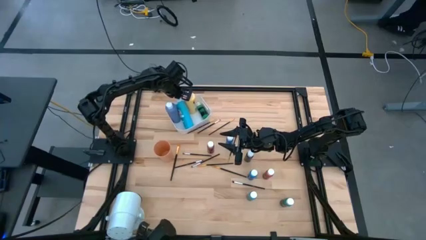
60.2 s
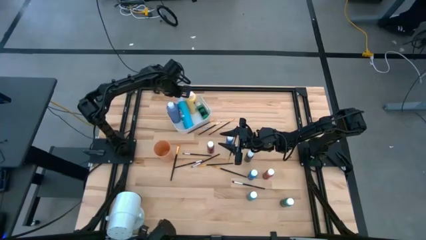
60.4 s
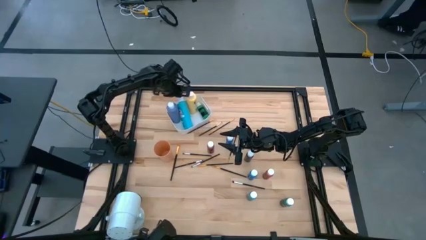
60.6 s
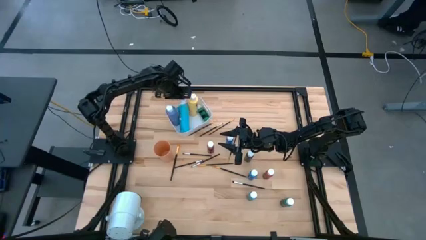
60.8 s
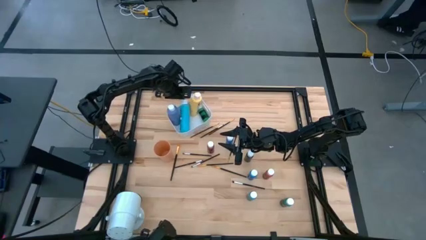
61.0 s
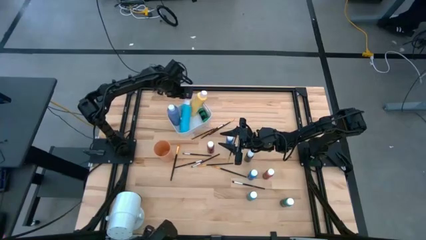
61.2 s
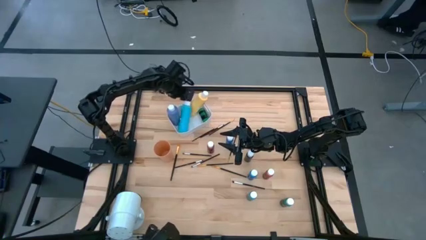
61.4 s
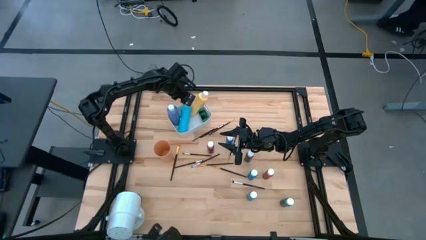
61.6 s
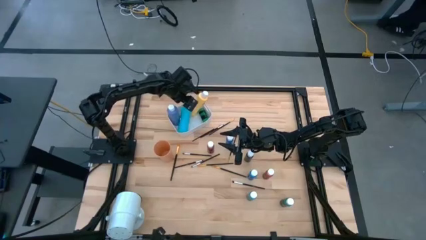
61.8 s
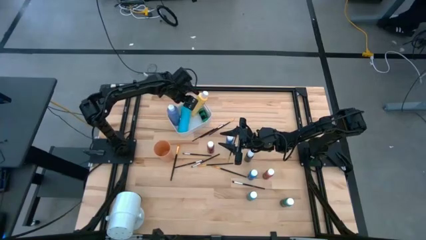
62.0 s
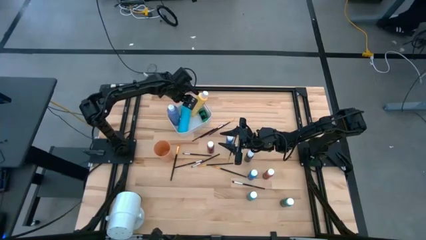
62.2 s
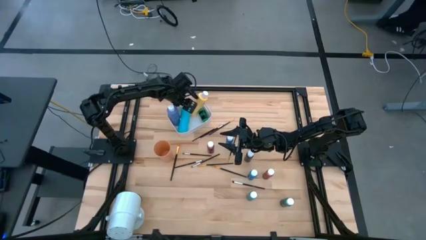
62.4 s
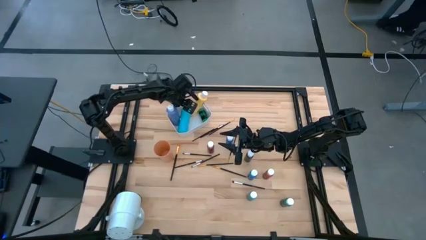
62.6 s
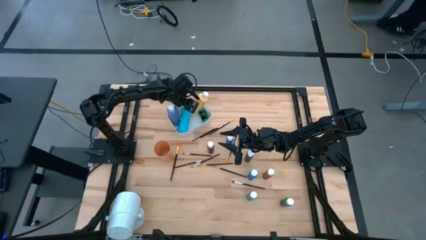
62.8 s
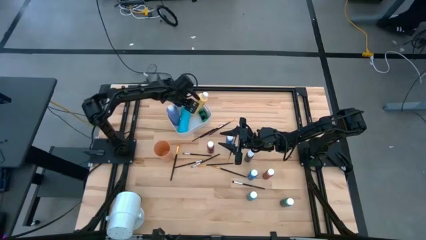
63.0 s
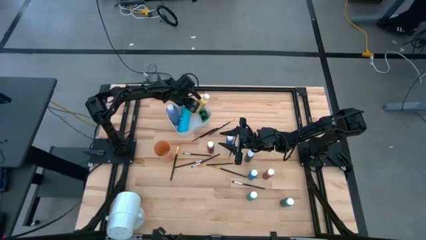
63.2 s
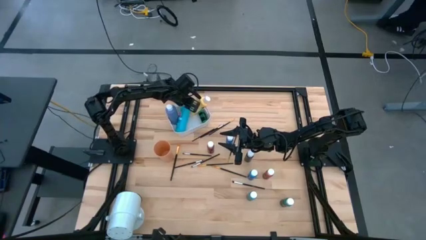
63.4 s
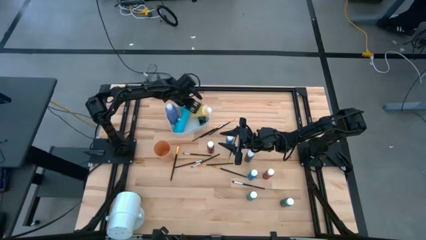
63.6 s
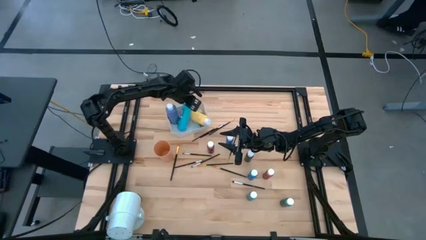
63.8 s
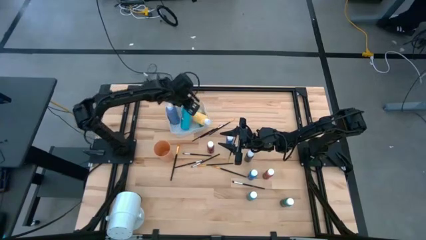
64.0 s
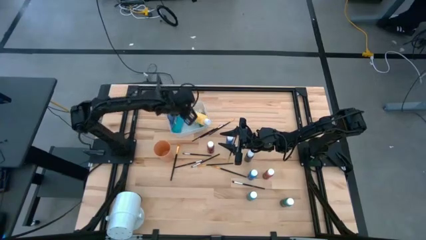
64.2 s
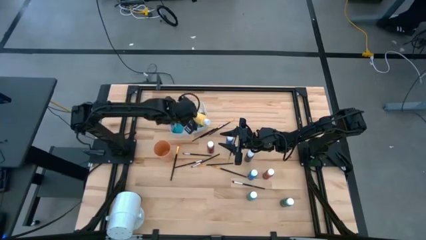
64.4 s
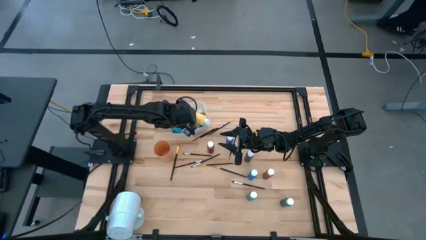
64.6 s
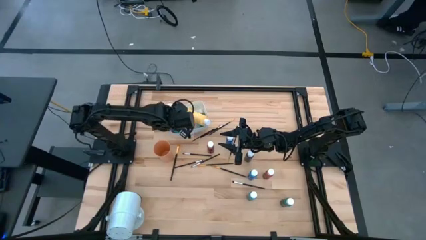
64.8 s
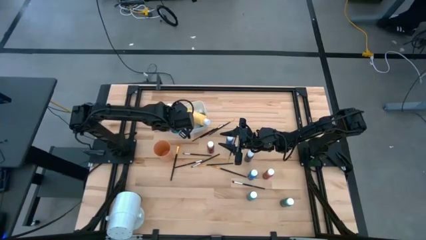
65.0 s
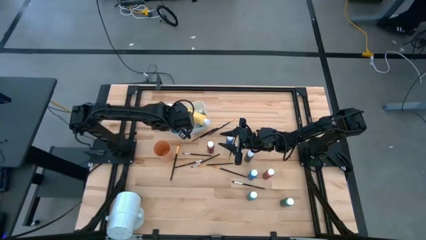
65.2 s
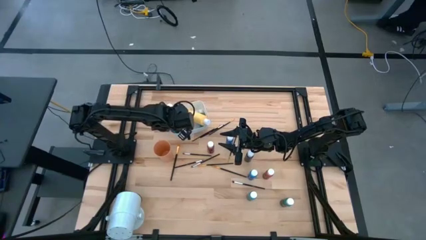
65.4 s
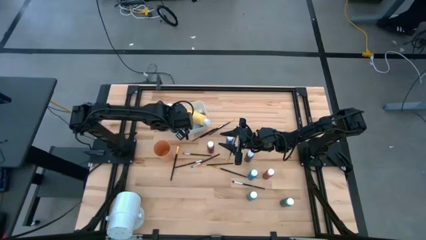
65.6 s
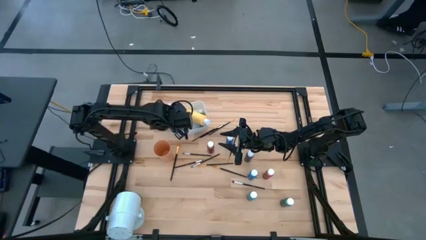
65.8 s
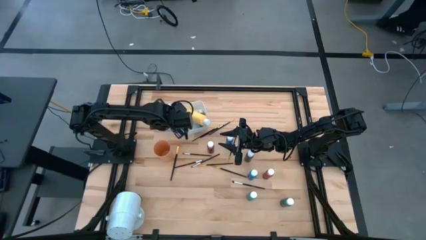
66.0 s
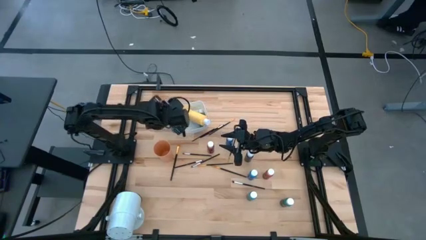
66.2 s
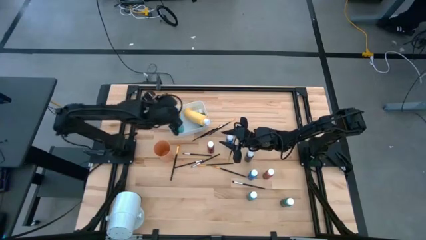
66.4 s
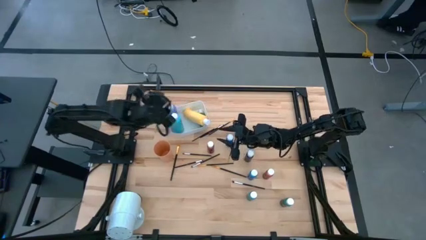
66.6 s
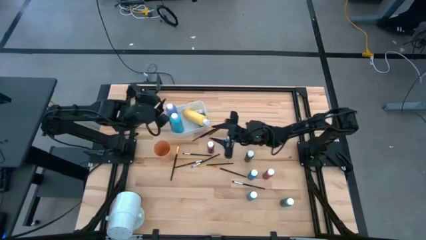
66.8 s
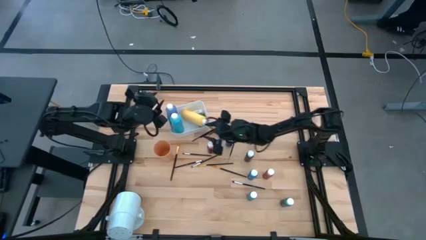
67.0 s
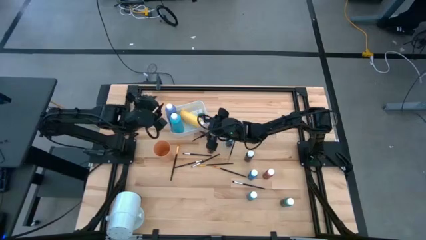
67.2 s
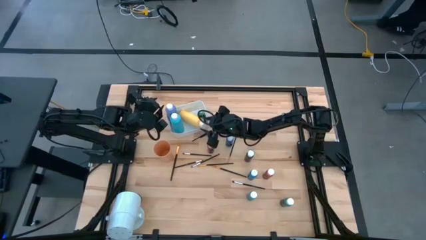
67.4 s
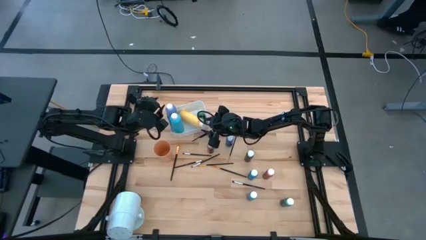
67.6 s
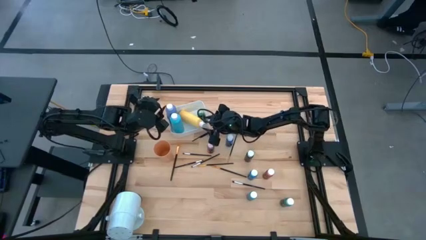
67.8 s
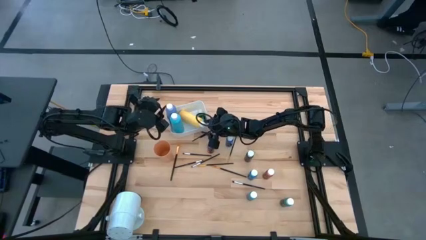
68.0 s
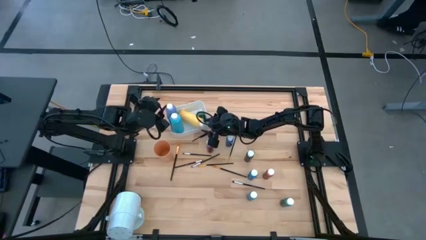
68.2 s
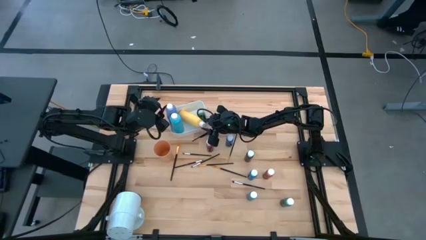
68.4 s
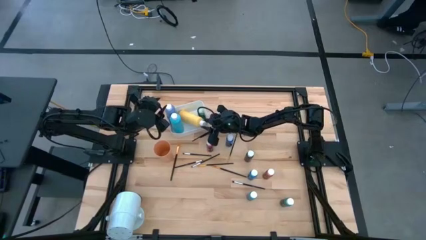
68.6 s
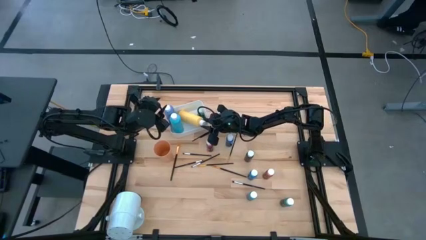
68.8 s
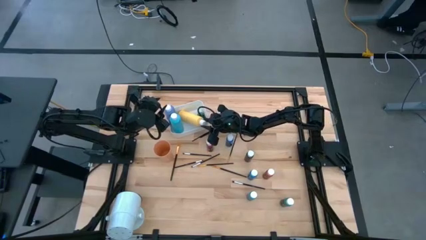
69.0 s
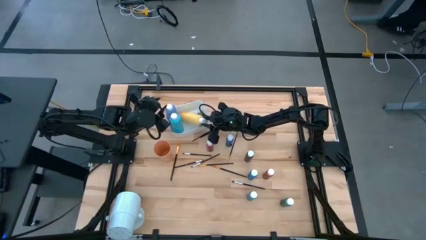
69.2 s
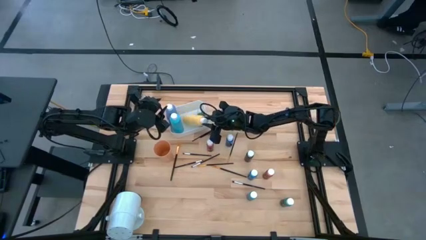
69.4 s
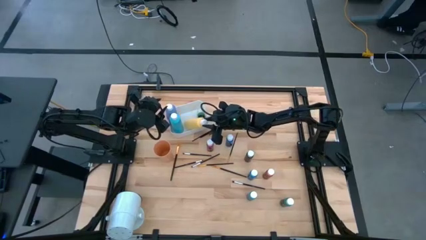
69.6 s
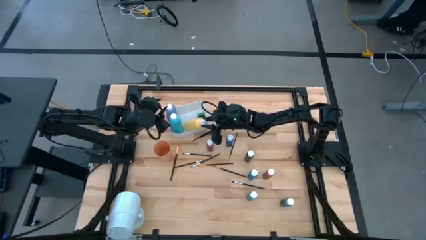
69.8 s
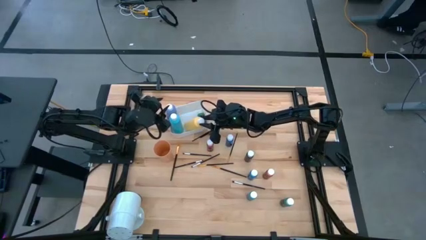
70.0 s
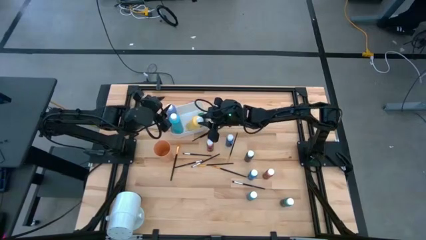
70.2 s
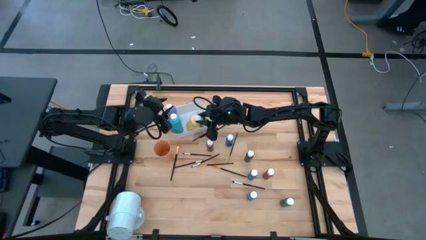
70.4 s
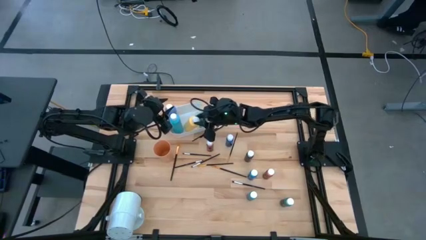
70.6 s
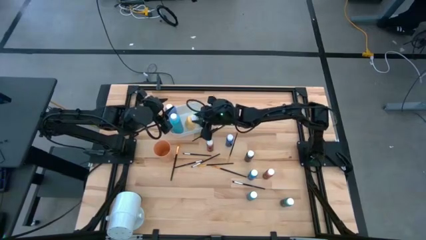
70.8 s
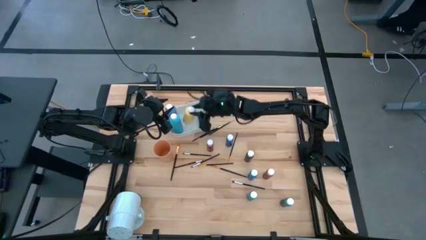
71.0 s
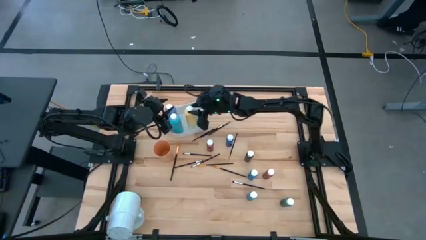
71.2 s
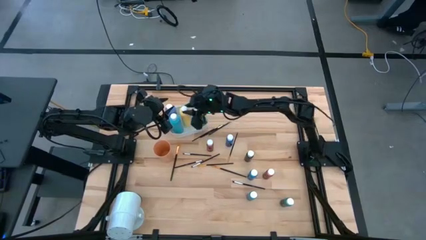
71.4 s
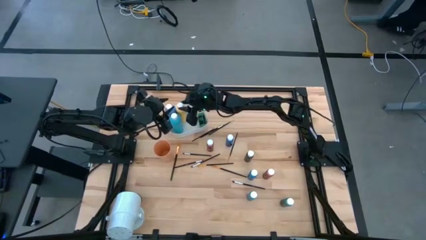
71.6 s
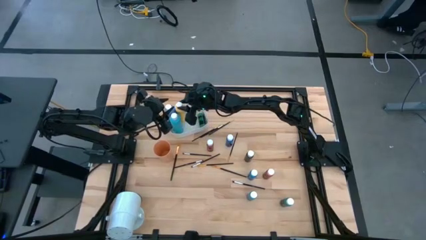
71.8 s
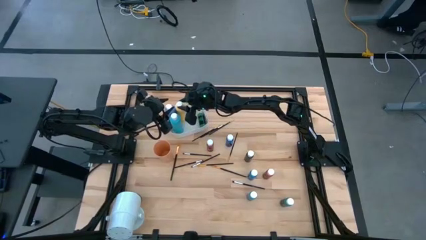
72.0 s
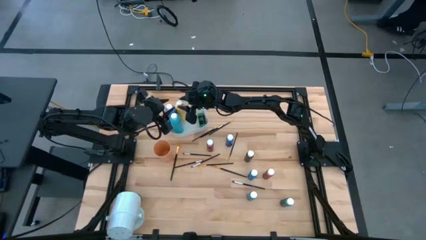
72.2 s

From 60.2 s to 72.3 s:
Task: Pick & Place Paint Supplies
Adjust the large paint bottles in the white bin

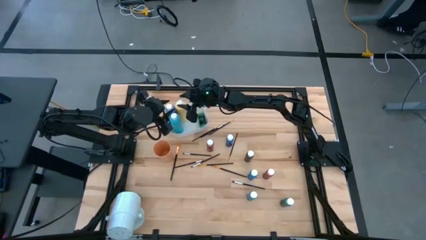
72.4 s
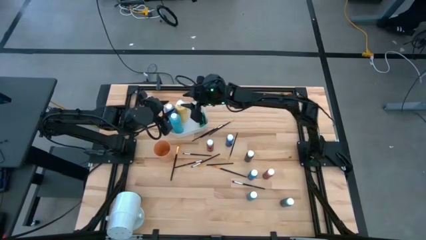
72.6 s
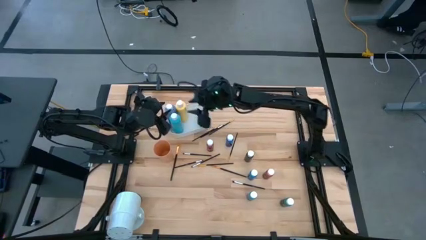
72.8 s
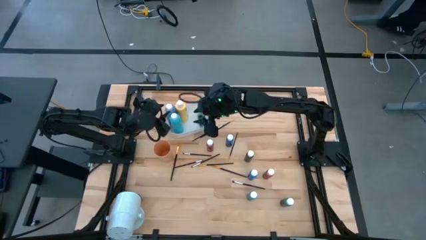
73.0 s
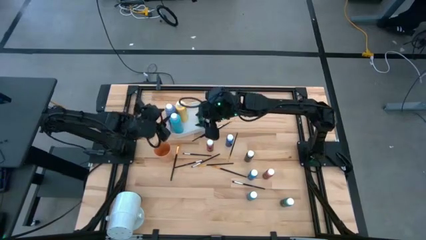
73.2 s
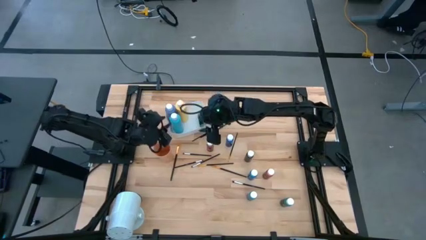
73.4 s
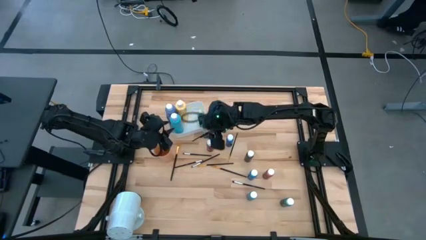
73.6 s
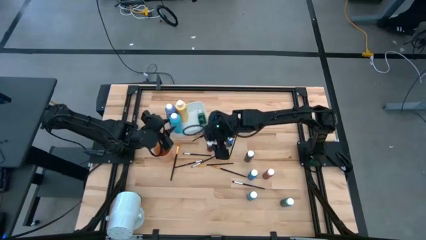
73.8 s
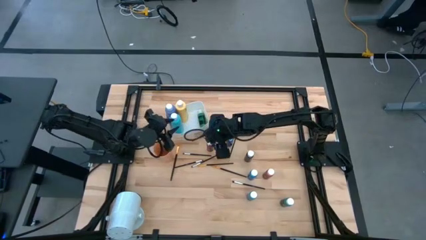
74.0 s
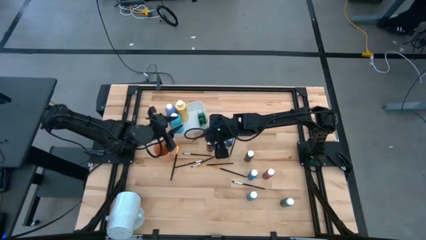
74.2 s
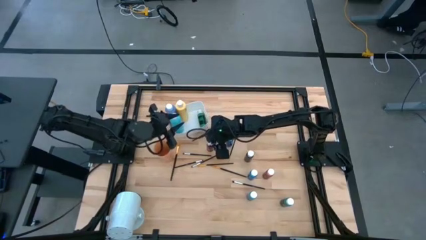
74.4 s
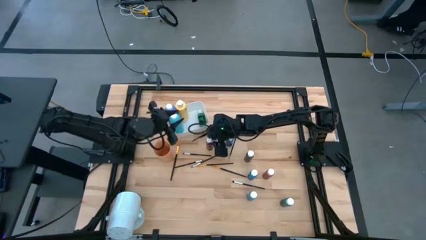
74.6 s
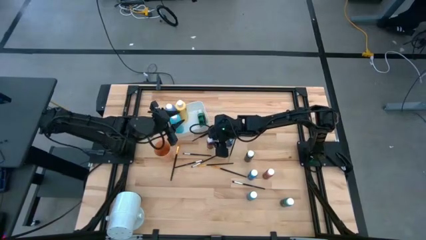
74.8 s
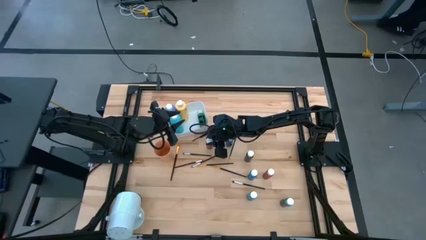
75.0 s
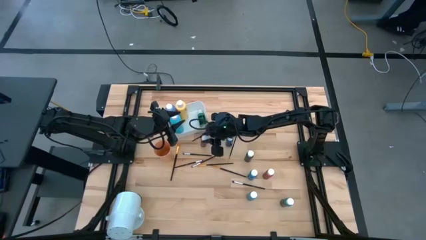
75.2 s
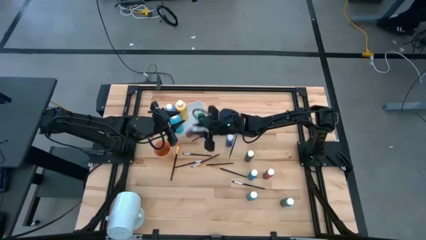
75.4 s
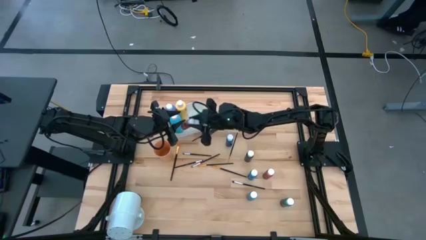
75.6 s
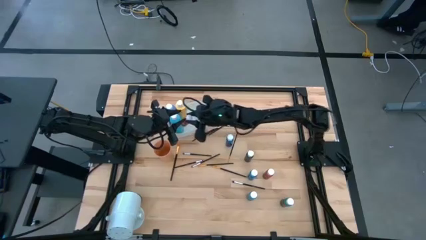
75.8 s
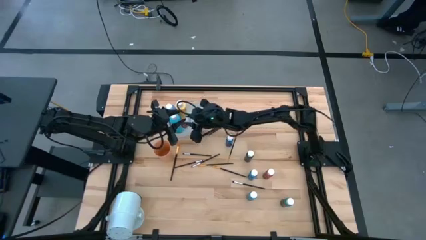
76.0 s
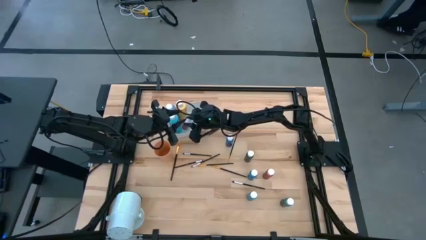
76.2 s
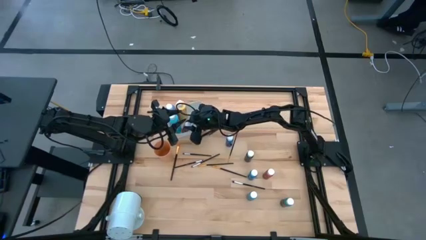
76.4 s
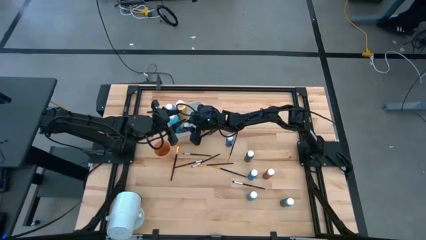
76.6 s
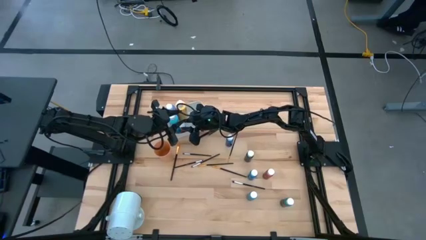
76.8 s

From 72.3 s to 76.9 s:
Put the red paint bottle into the white bin
